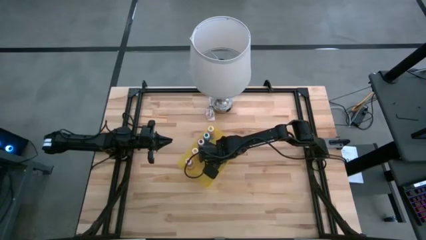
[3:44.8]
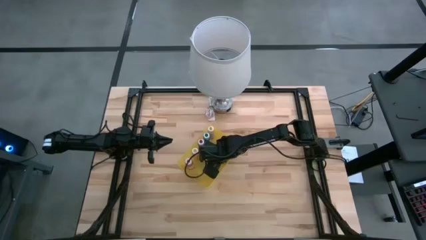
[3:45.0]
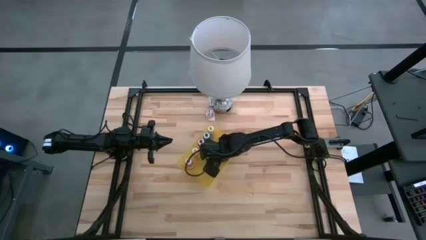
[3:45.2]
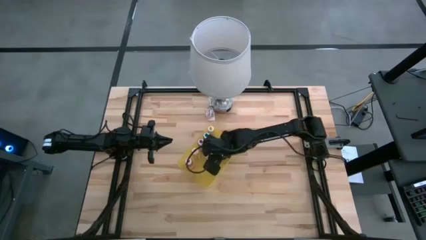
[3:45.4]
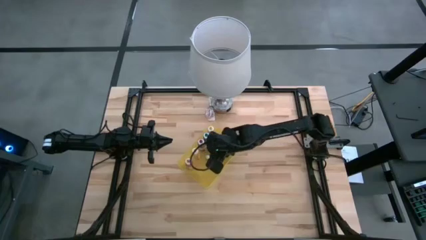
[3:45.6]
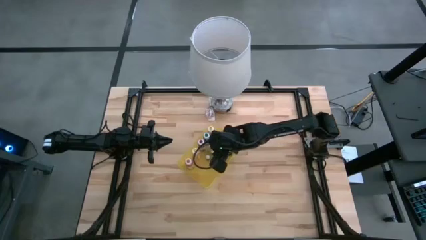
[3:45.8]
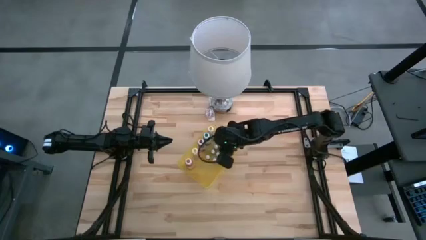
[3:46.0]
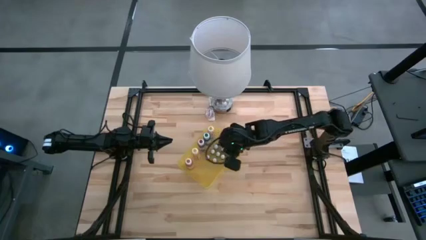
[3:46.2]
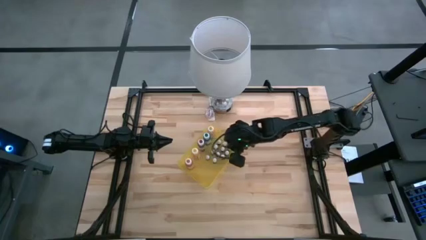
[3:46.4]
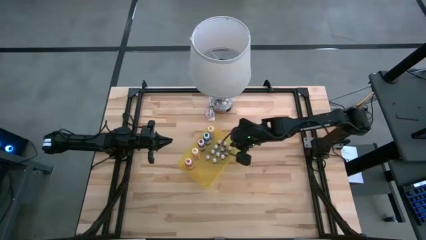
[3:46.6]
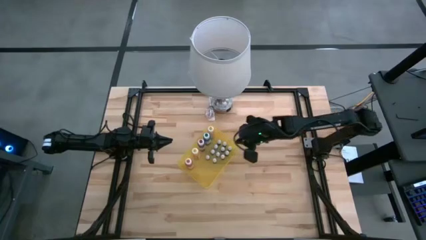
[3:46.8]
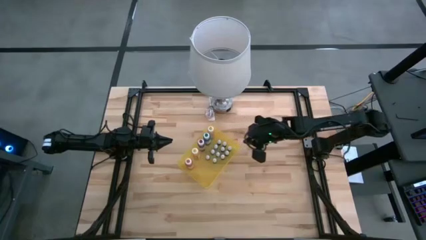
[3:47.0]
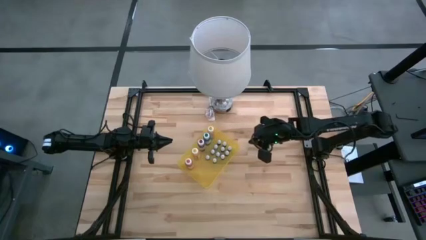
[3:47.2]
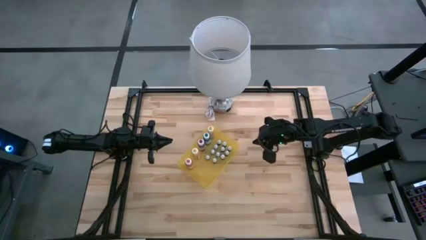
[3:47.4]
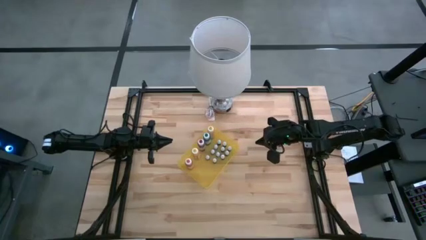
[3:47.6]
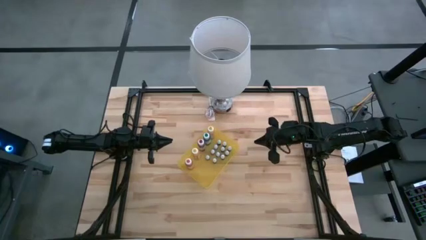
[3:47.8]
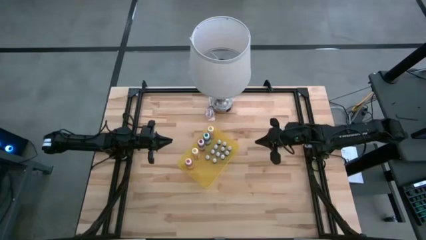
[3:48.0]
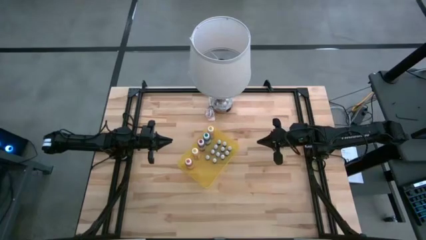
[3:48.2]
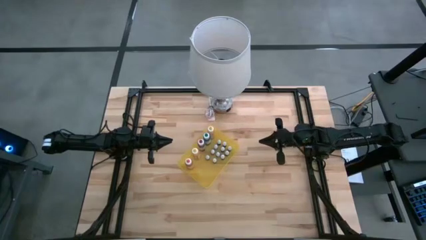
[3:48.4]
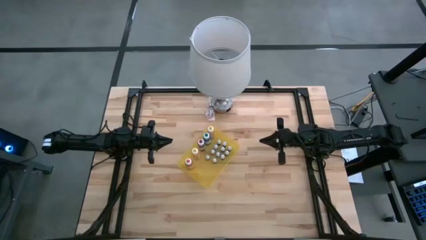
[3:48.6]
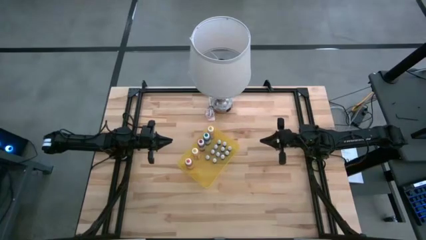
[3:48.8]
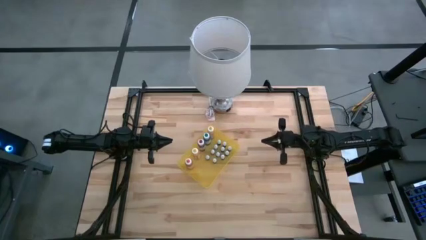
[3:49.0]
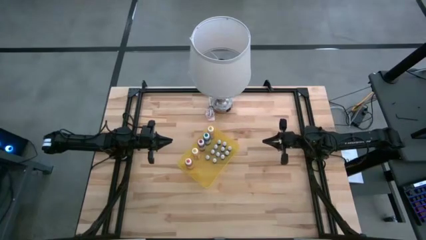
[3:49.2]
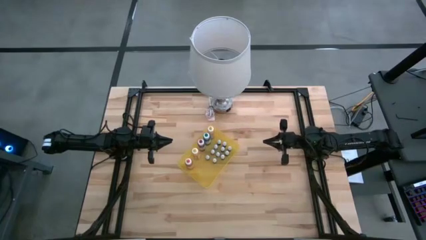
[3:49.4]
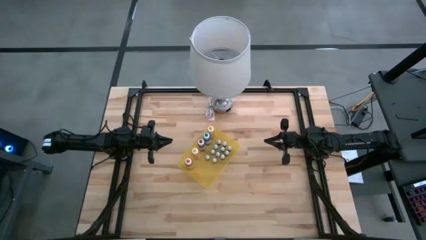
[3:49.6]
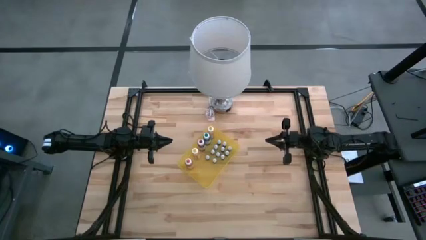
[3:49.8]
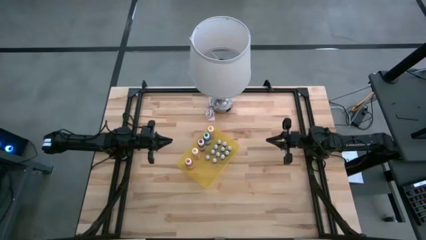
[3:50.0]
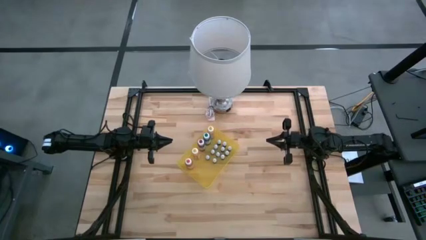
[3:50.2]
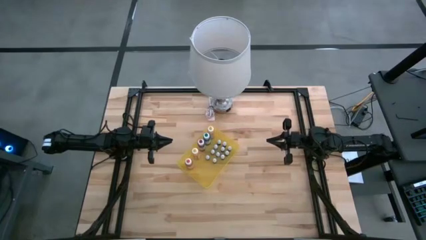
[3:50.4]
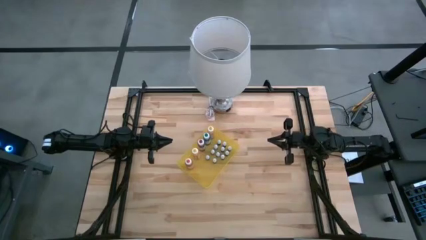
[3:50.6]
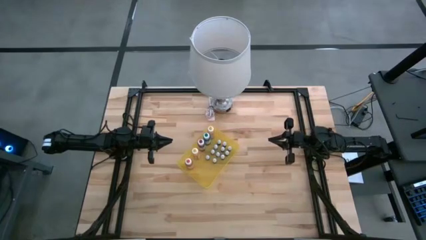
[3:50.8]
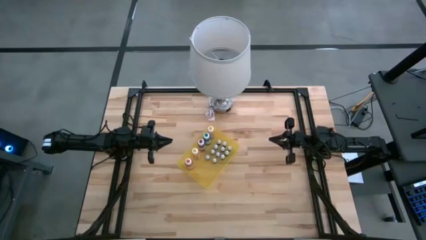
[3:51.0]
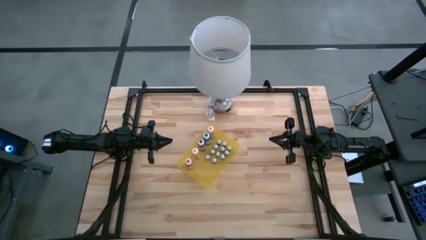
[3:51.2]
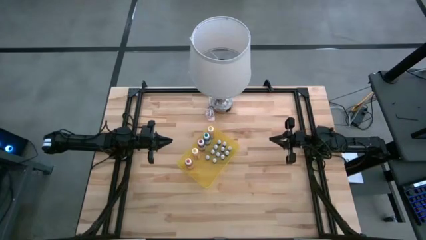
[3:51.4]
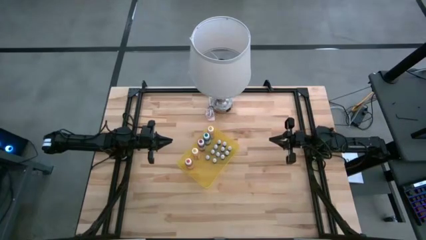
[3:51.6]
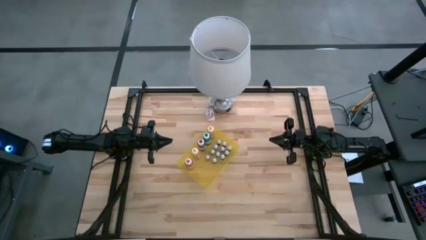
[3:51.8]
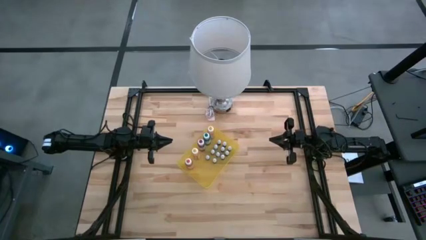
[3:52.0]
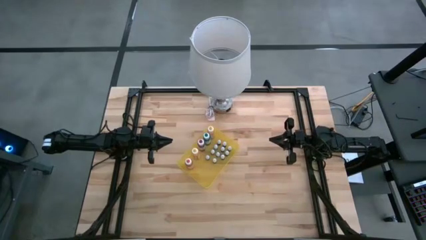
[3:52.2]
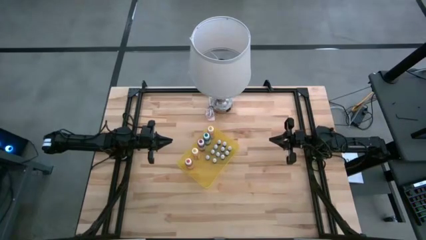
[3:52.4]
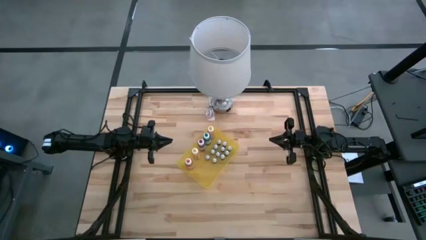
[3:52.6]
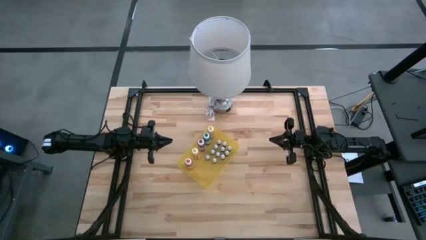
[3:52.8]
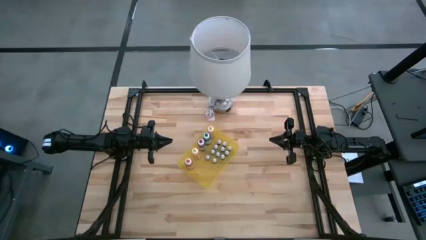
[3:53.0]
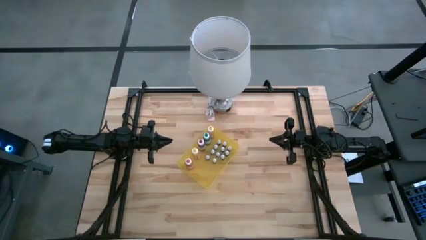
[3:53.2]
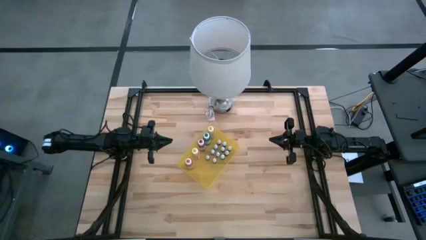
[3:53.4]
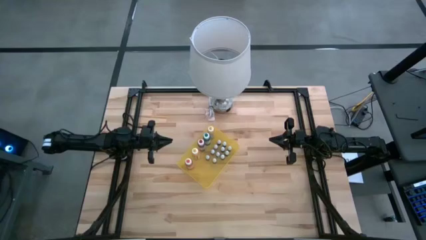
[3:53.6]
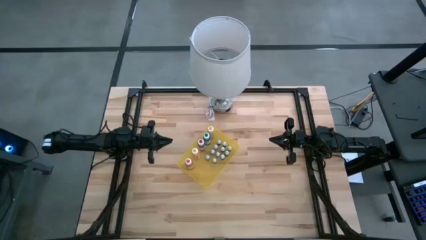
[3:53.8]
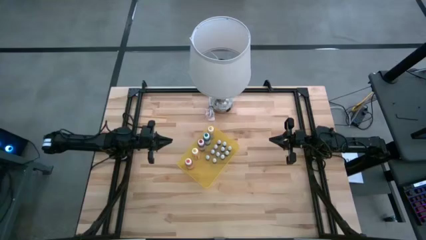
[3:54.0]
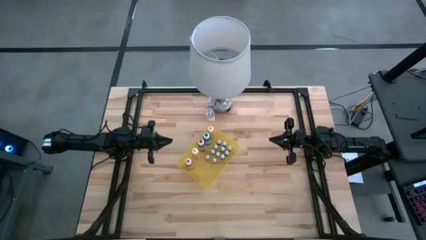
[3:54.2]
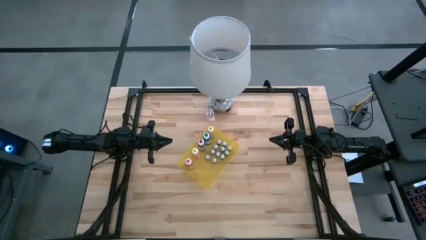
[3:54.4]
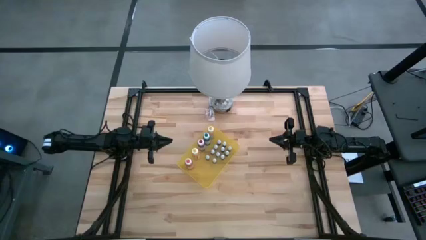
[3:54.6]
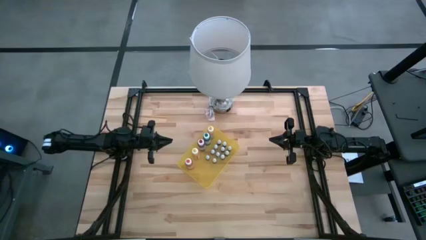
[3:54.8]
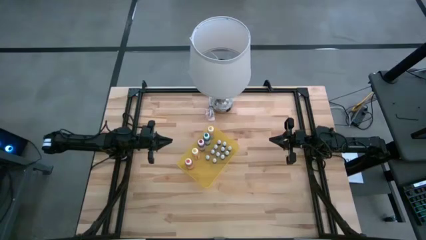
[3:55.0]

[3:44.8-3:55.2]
Task: Pick & Place food coloring
Return to Home Position

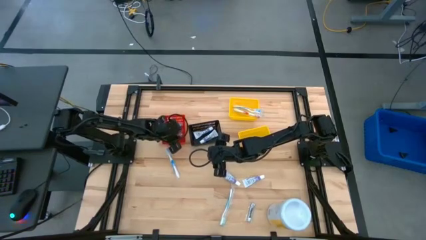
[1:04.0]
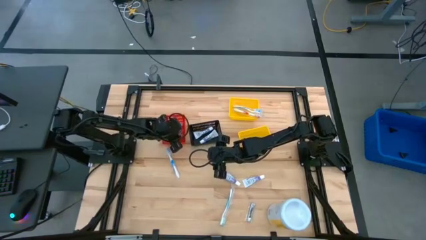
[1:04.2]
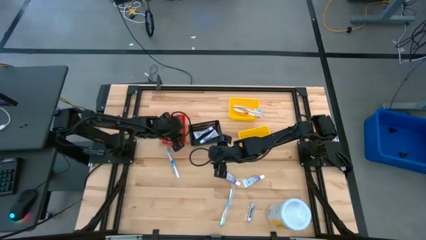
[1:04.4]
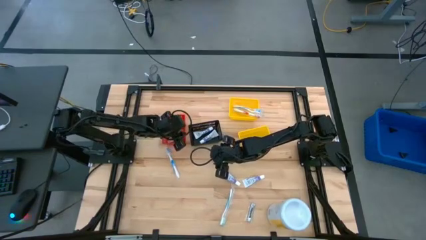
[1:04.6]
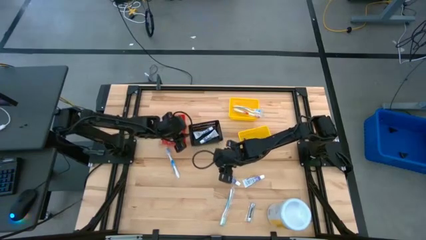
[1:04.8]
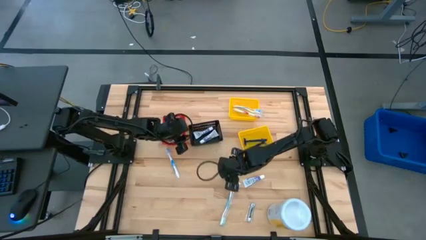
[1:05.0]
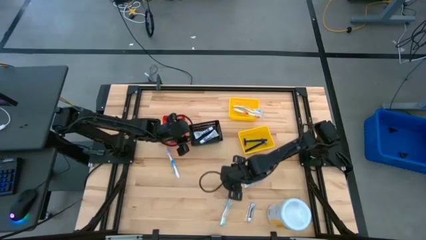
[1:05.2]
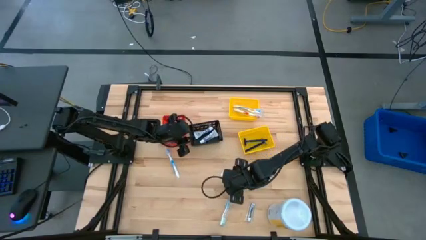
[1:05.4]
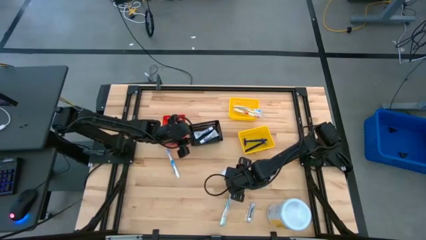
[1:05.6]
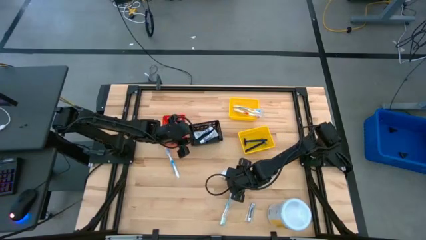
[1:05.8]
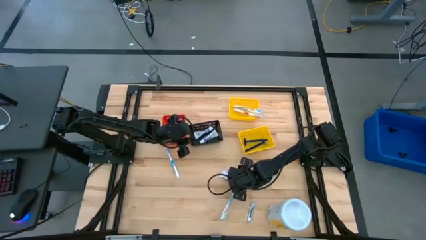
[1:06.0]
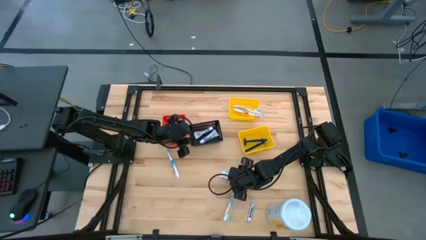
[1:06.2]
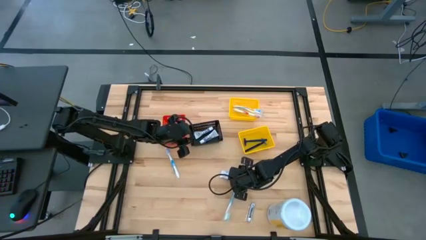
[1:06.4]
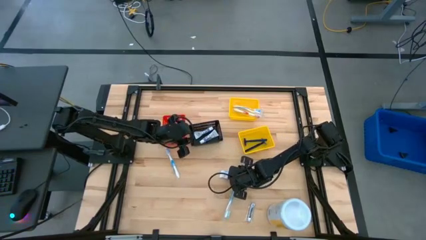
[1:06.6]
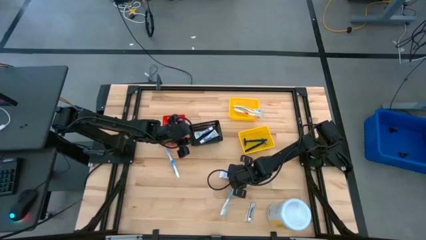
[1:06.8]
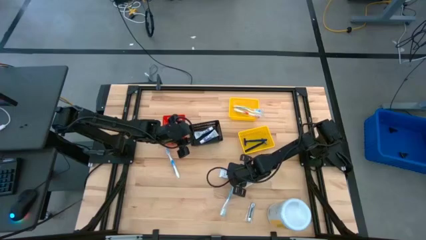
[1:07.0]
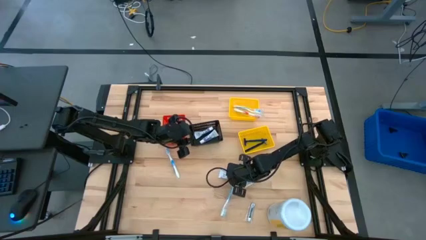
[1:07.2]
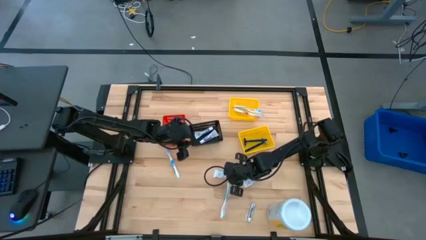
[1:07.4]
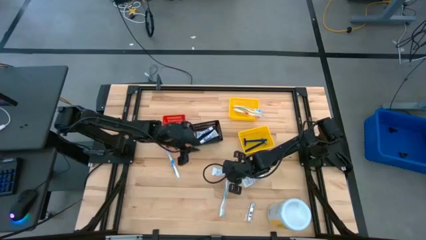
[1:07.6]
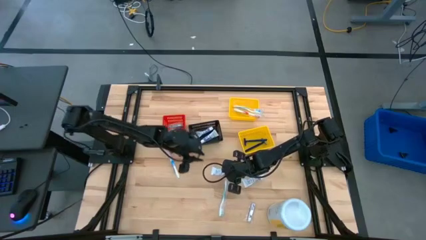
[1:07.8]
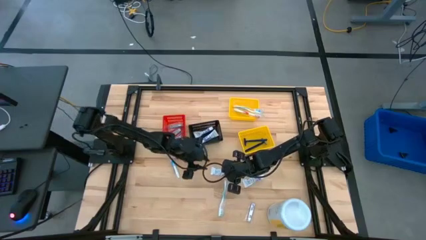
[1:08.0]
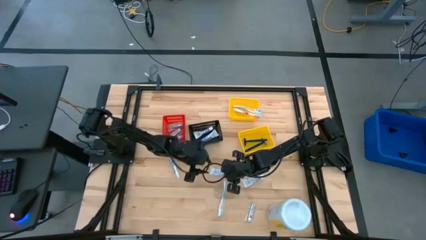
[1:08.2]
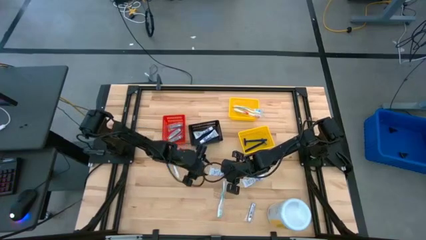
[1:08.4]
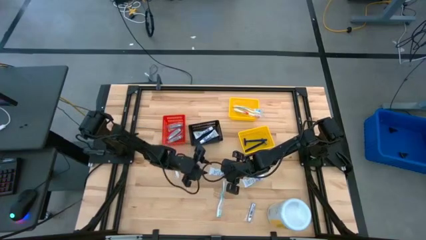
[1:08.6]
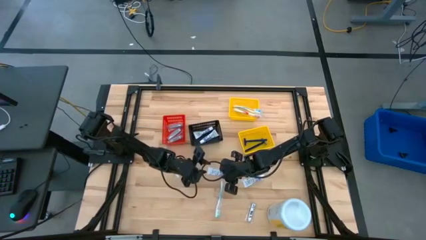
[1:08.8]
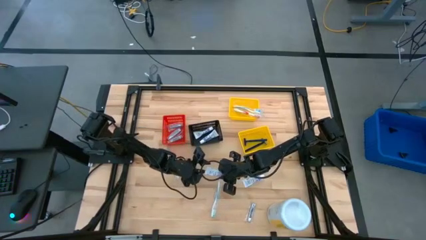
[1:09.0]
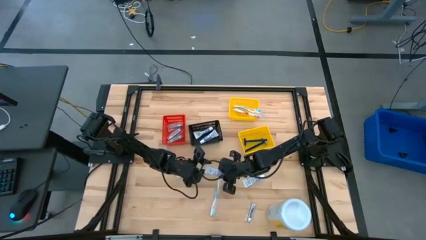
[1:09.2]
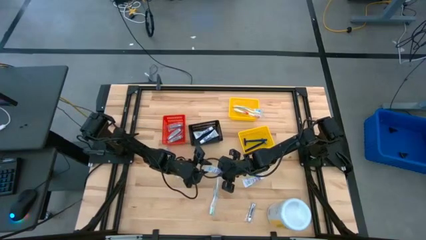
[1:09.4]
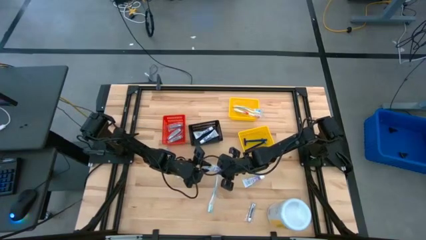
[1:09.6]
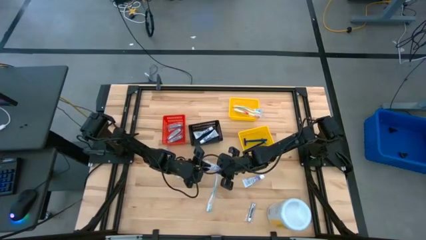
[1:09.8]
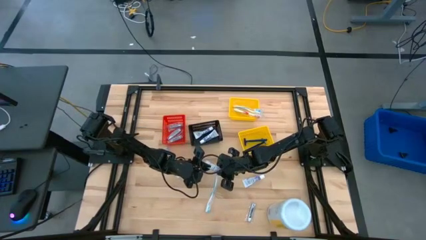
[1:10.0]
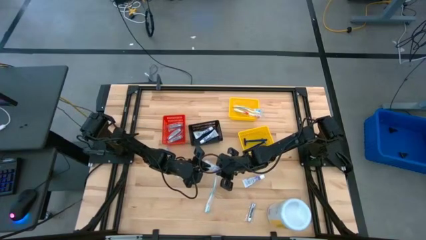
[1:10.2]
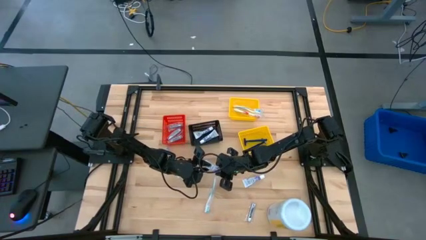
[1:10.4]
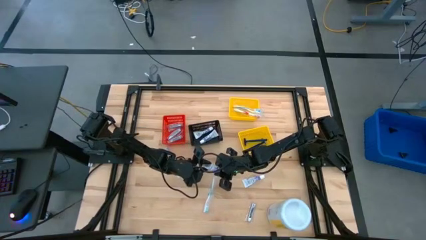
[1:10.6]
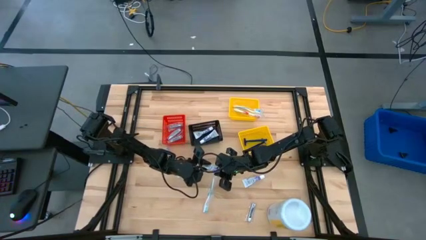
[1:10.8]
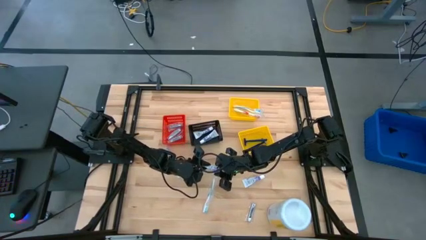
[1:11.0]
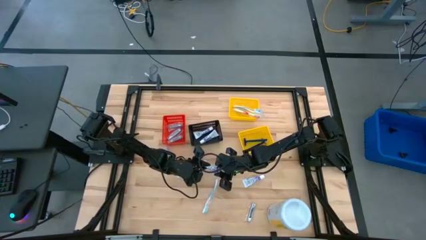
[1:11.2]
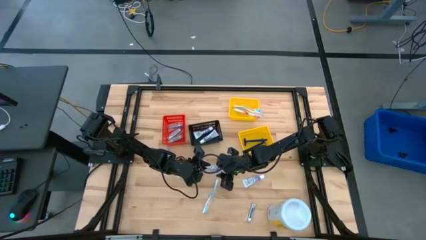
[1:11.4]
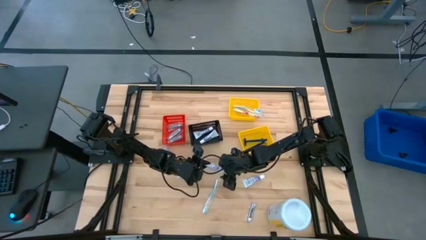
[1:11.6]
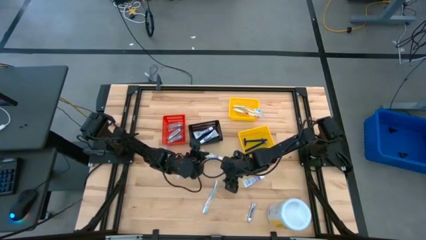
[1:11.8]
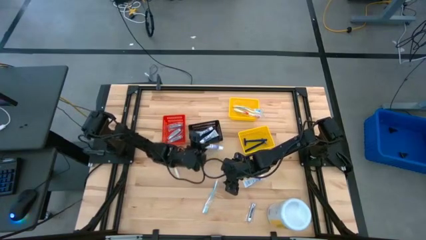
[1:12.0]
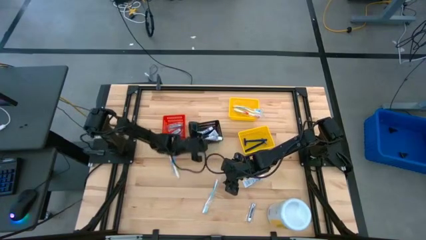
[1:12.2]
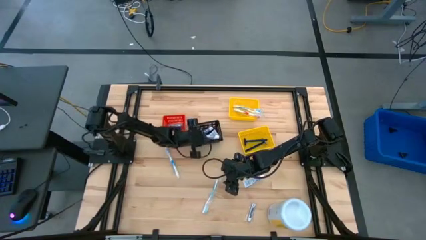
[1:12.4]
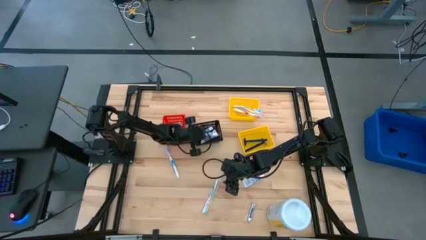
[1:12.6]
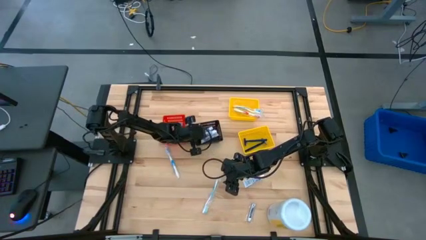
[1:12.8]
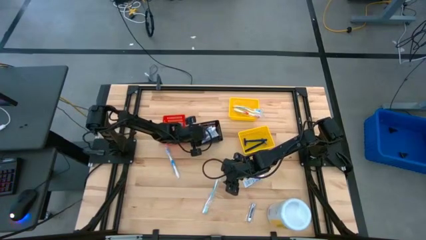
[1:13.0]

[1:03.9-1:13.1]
Task: Pick & Place Travel size toiletries
Put the white toothpaste into the black bin
